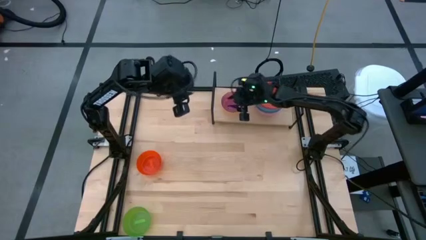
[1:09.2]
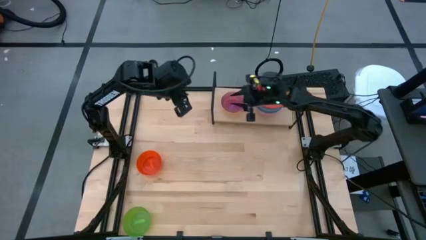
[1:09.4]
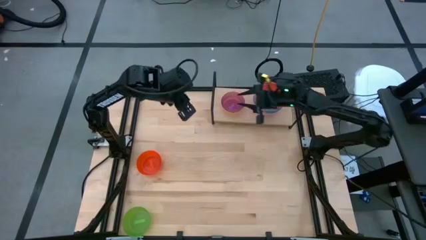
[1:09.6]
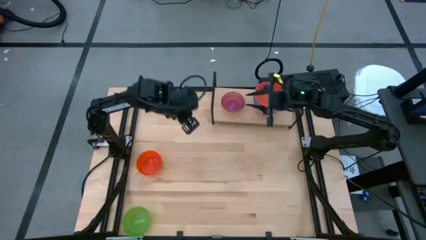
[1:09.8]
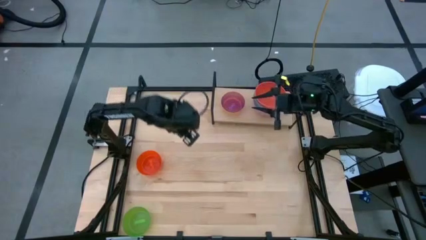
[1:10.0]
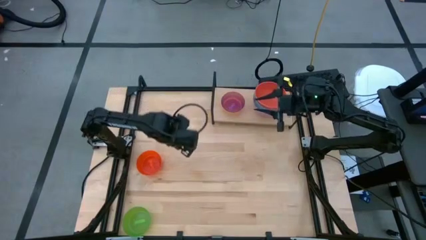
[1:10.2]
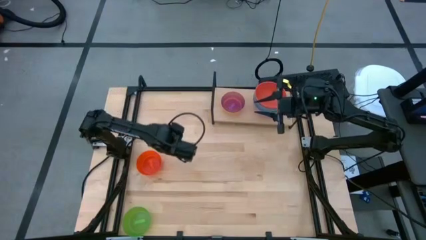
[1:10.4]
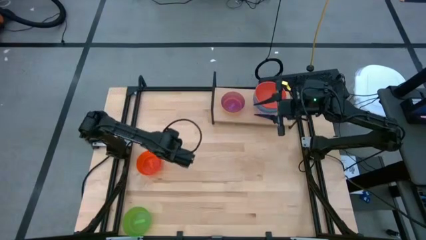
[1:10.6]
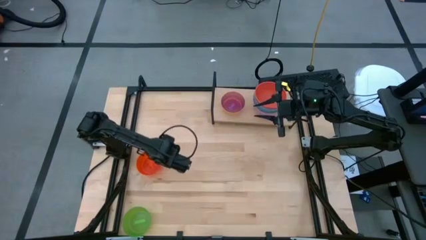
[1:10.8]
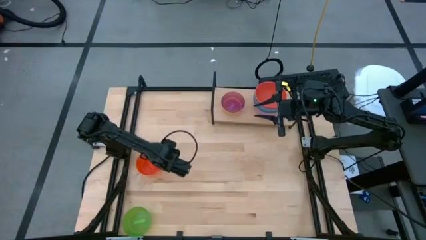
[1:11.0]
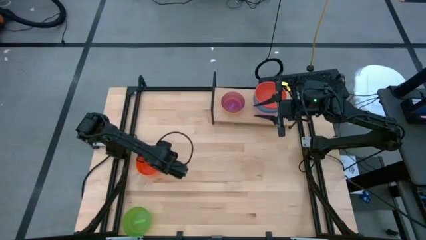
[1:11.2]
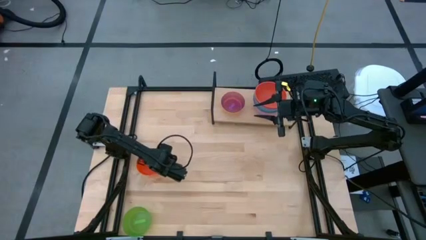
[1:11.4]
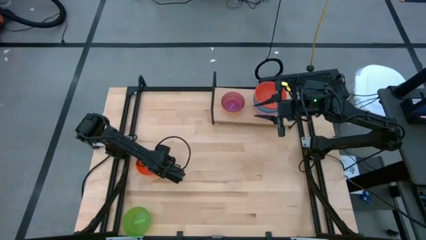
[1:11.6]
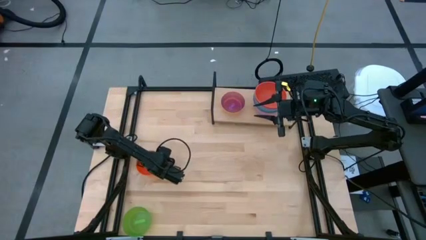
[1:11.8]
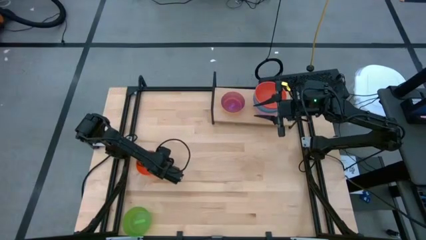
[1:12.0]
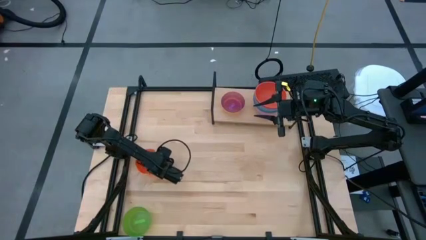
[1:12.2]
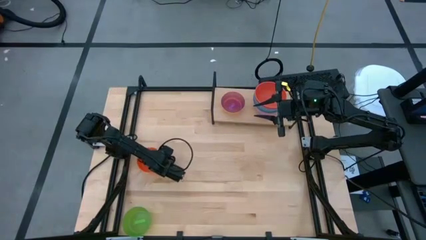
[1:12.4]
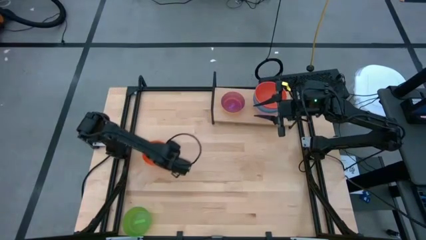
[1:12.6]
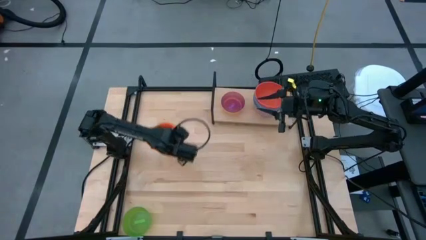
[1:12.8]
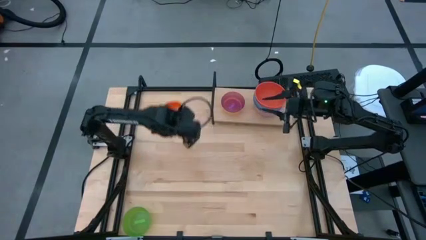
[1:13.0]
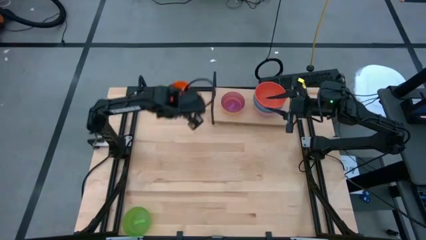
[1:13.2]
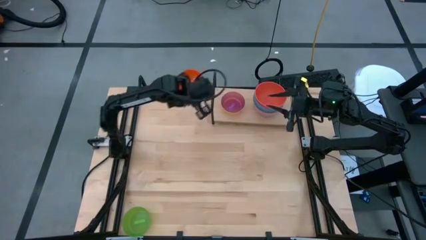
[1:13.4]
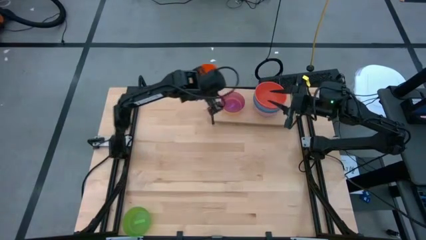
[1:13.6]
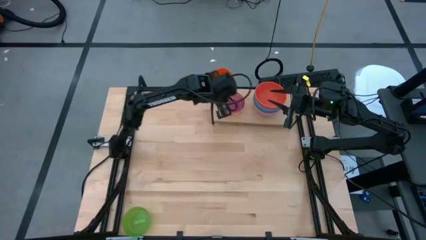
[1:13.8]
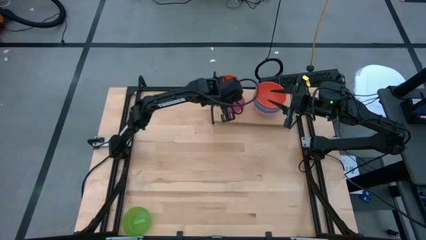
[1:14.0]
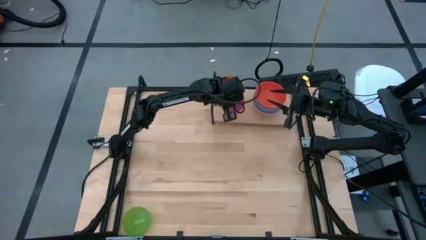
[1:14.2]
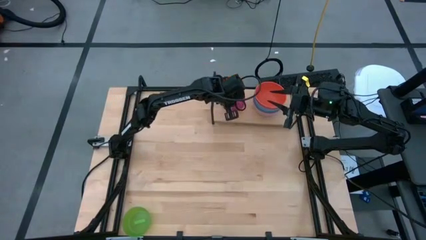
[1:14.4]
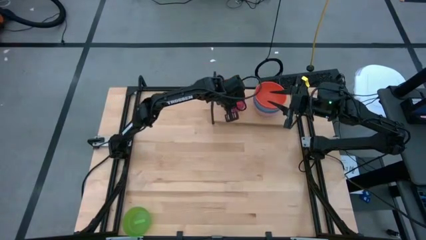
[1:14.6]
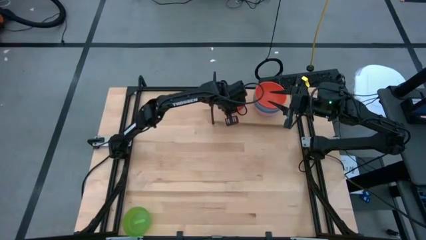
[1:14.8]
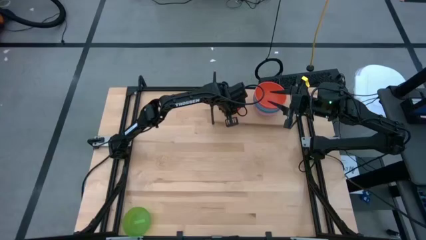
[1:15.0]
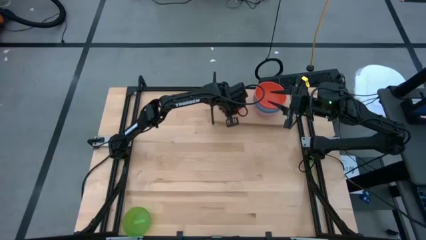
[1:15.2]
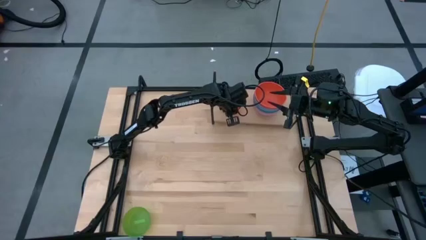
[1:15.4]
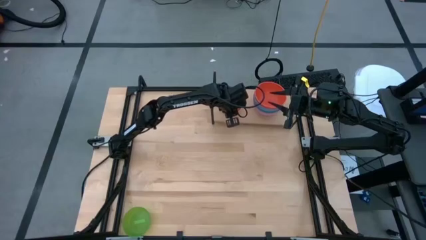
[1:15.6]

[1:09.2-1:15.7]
Task: Place and stack bowls onto a shelf
Stack the transparent orange bowl on top of the transparent purple bowl on the shelf

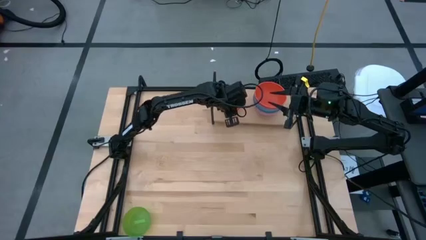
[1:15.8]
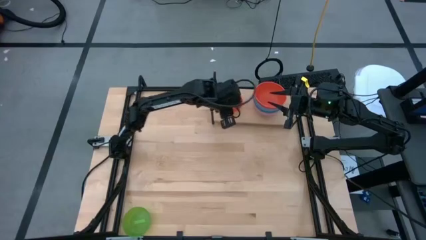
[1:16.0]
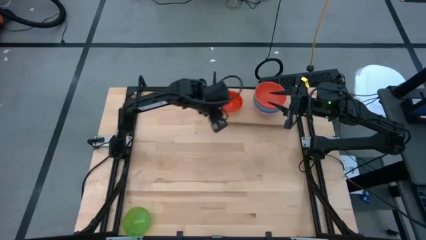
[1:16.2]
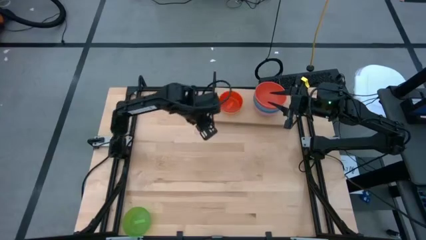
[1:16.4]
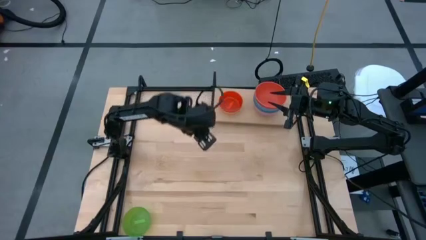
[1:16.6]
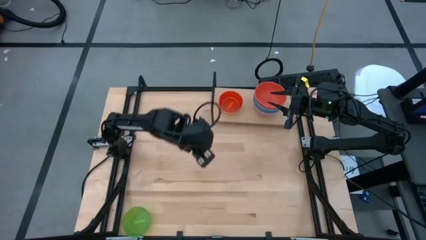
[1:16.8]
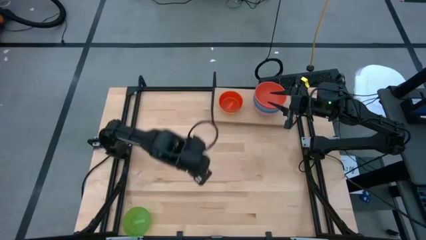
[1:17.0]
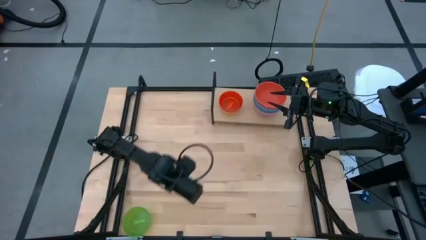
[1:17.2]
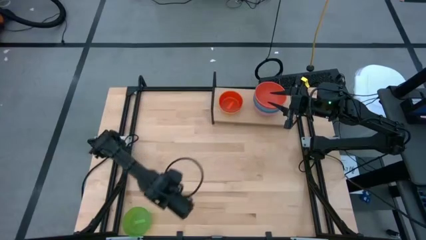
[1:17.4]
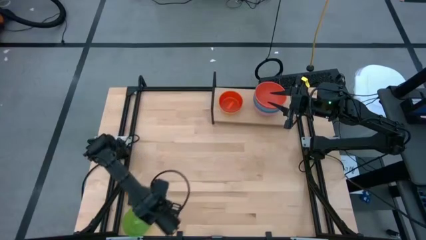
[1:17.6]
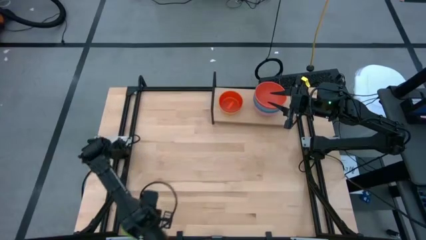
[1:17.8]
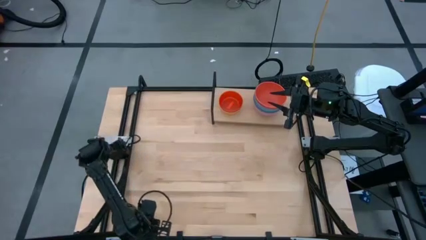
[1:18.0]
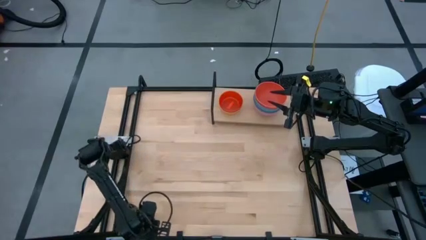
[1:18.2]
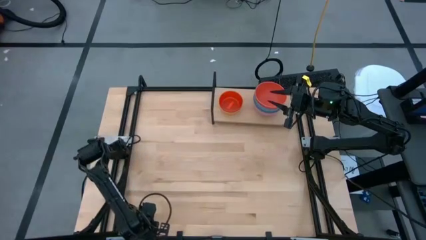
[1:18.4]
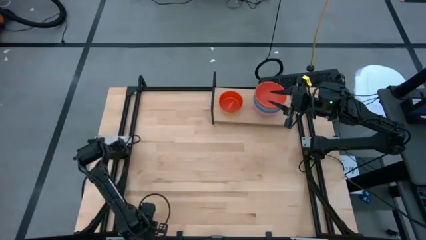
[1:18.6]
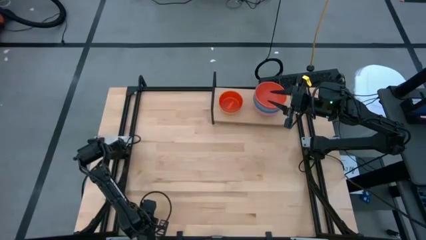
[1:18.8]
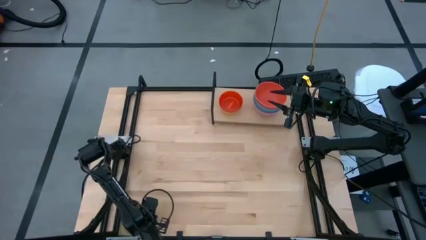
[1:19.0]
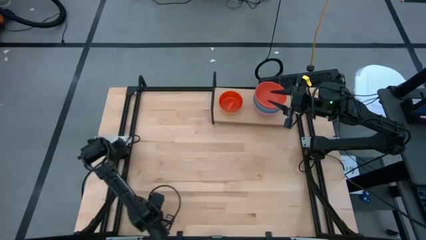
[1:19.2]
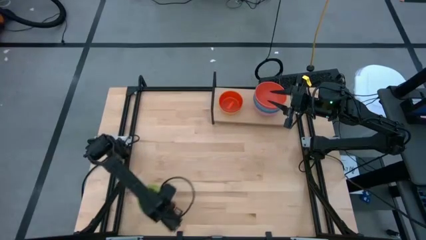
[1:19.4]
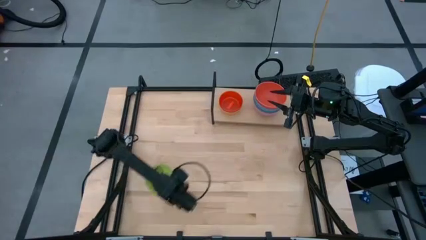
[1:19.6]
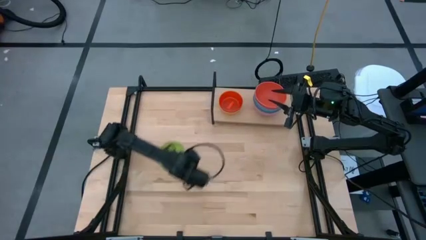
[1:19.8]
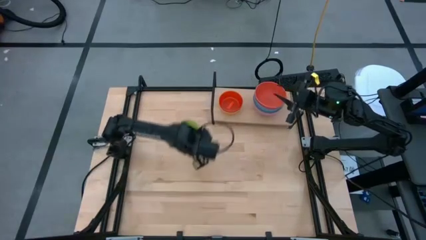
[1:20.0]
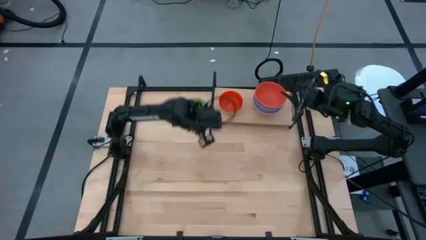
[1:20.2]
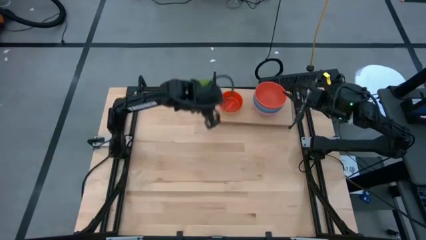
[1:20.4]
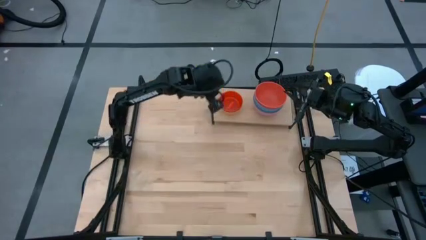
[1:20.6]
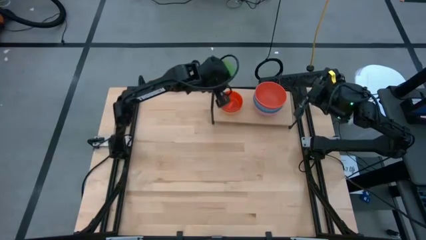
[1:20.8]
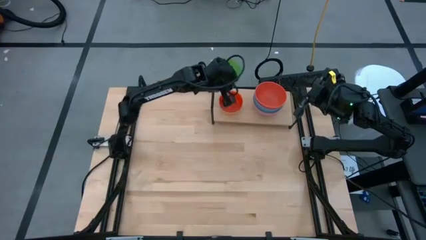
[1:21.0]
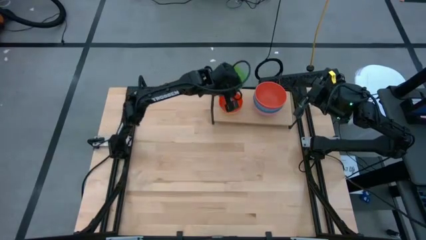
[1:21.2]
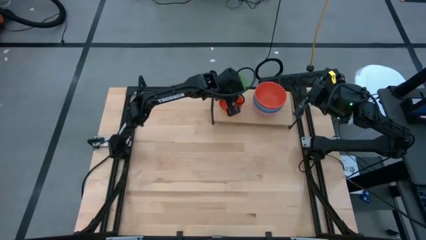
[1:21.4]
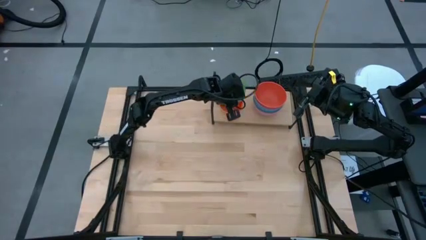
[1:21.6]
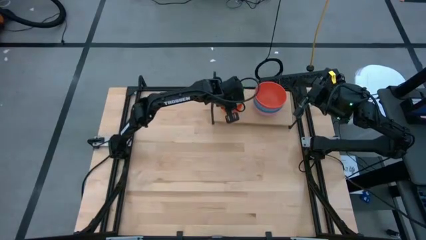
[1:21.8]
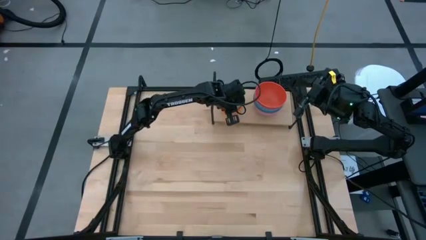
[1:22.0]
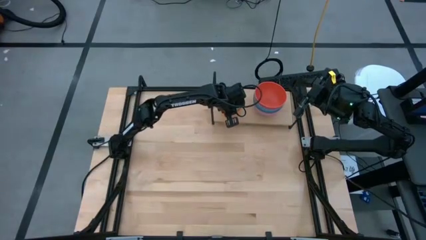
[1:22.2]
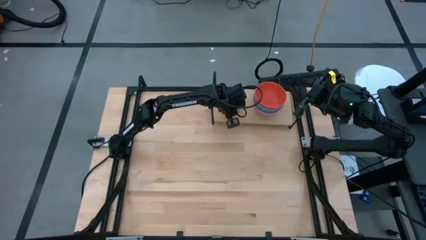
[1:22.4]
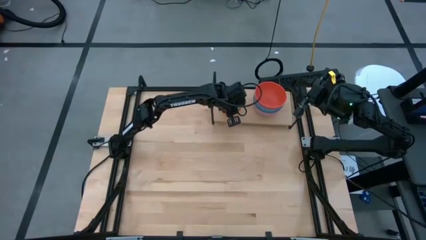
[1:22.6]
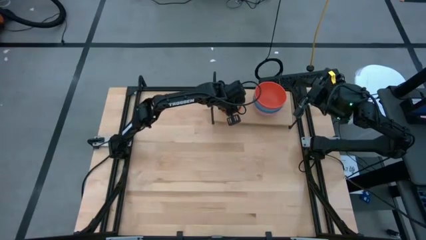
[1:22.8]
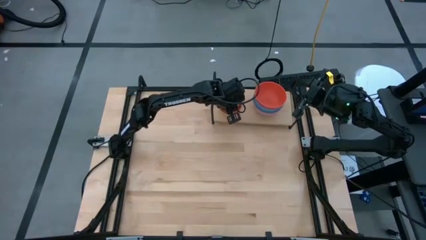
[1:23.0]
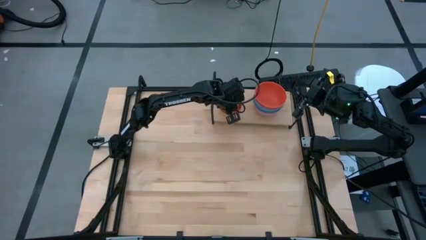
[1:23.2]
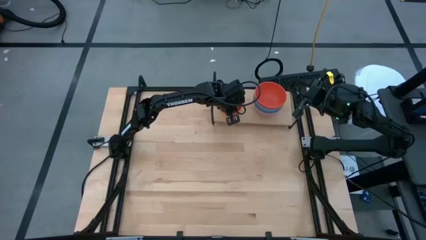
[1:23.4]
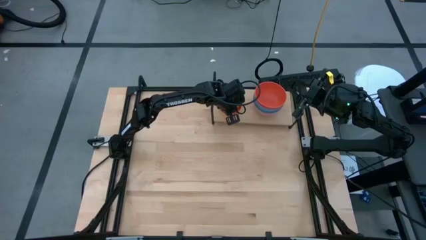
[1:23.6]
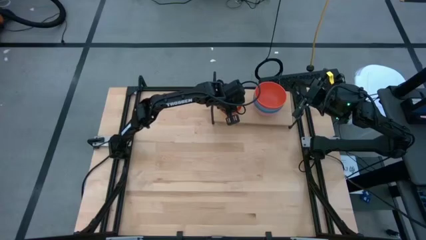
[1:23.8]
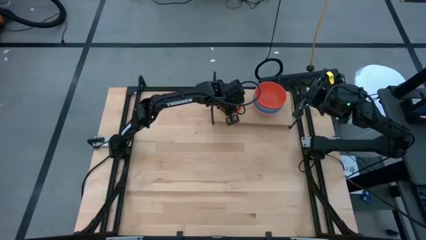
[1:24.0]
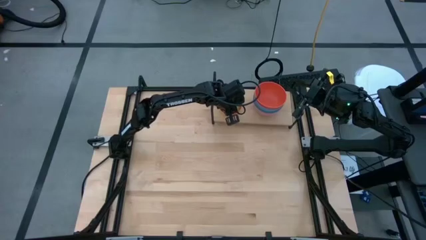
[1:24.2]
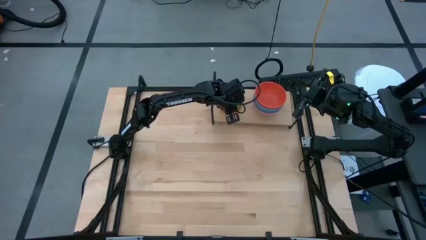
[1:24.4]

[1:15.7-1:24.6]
Stack the transparent green bowl on top of the transparent orange bowl on the shelf
